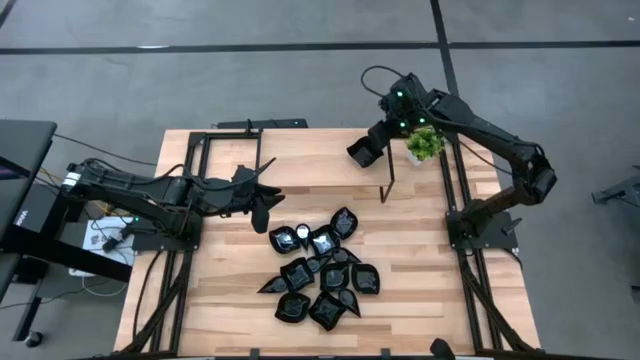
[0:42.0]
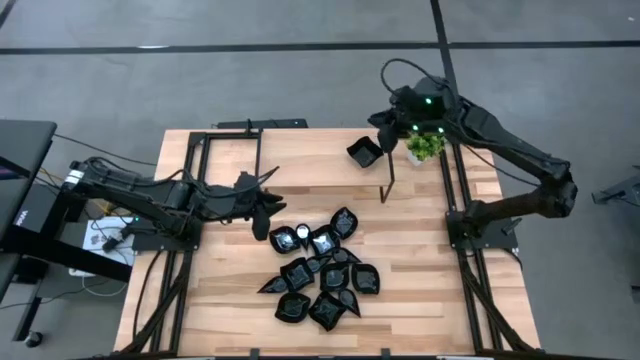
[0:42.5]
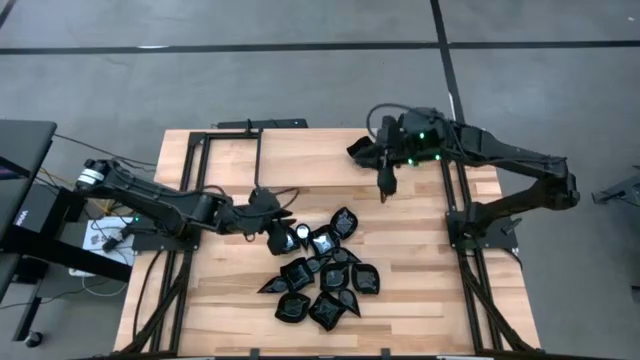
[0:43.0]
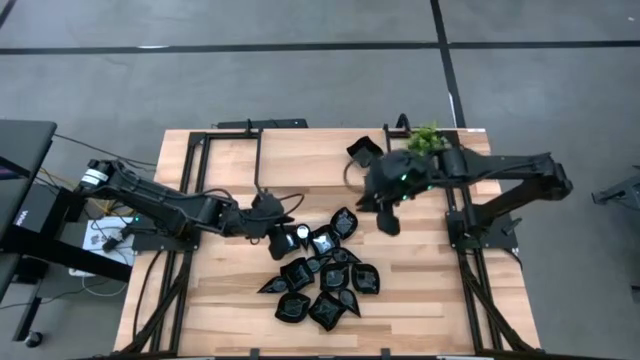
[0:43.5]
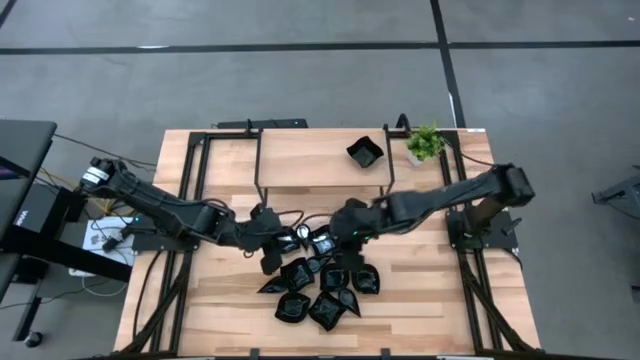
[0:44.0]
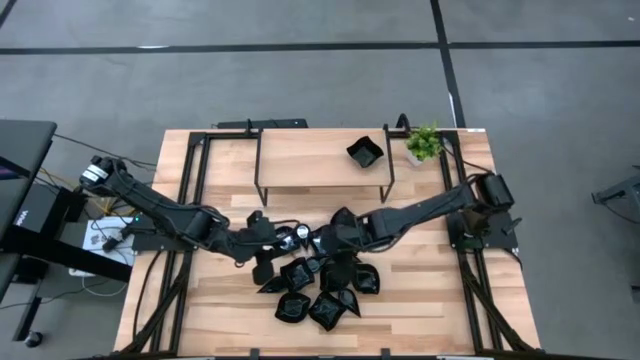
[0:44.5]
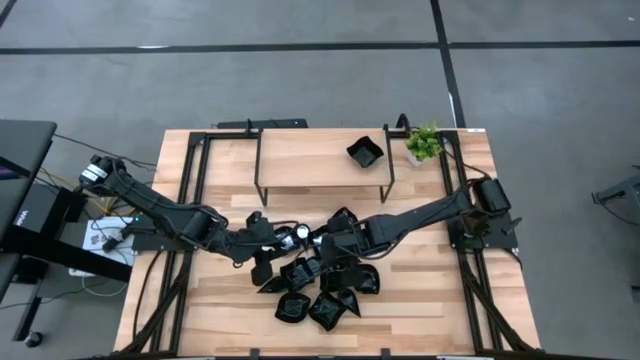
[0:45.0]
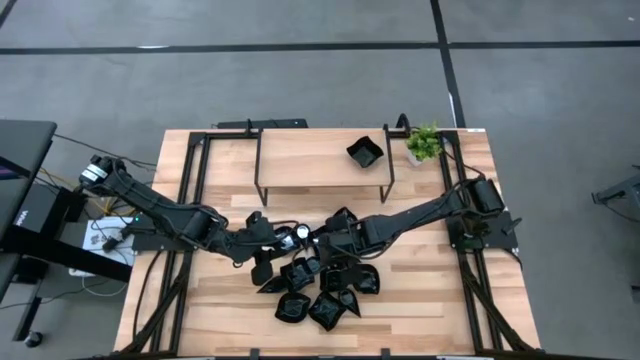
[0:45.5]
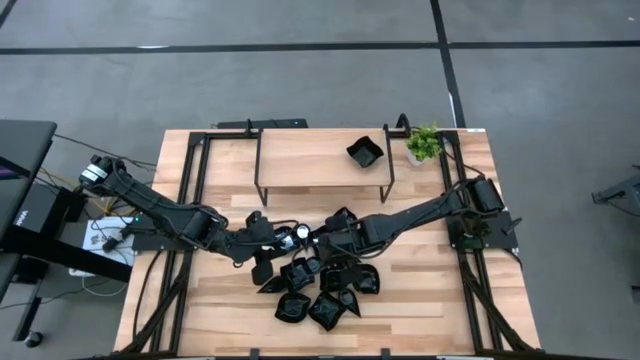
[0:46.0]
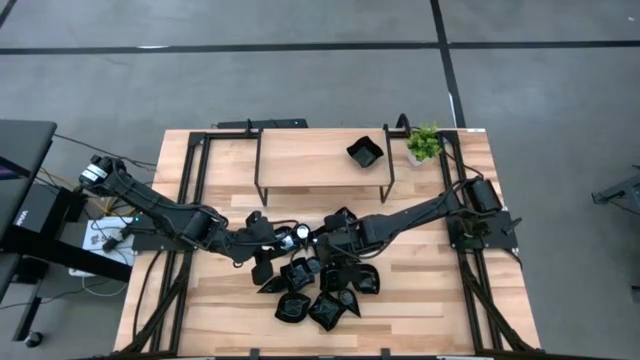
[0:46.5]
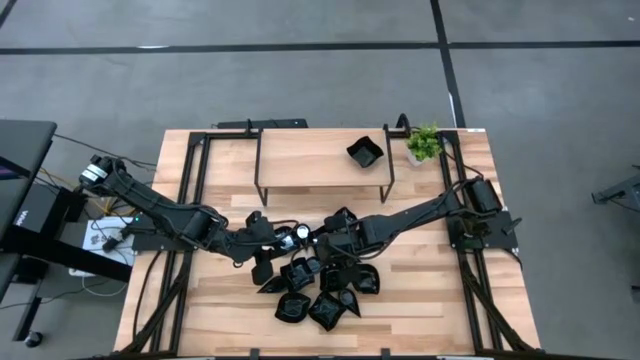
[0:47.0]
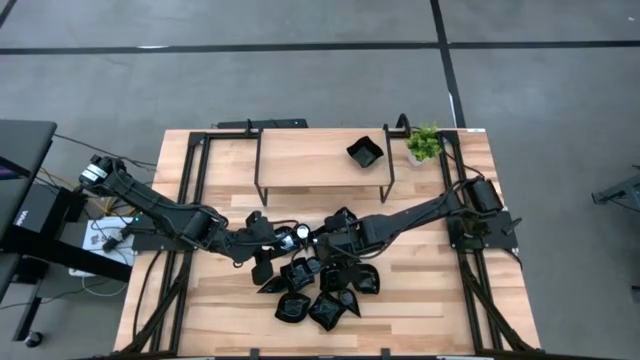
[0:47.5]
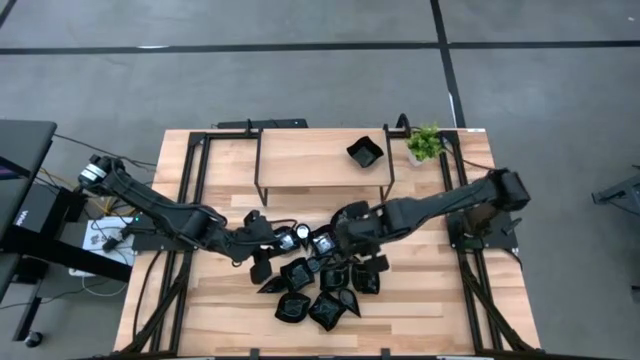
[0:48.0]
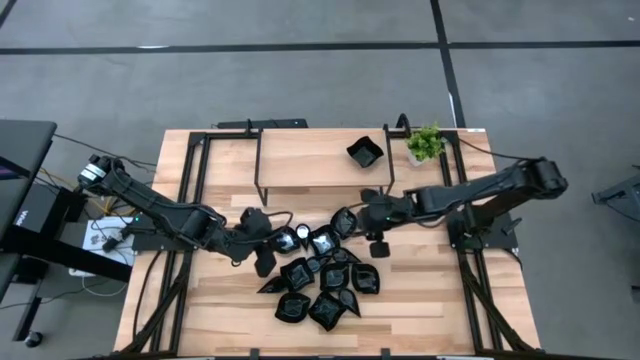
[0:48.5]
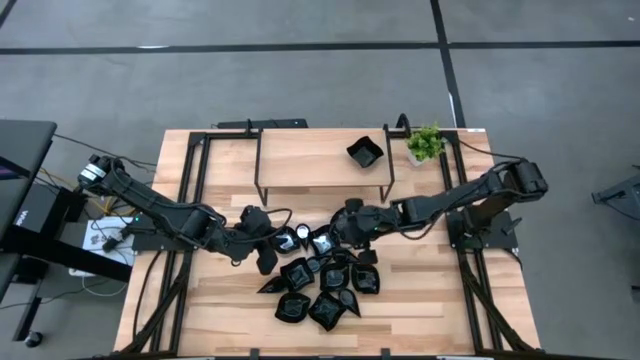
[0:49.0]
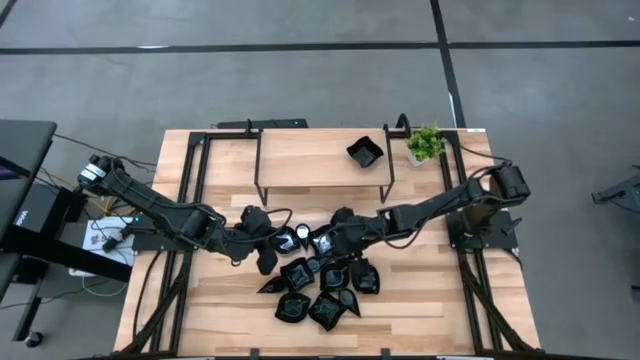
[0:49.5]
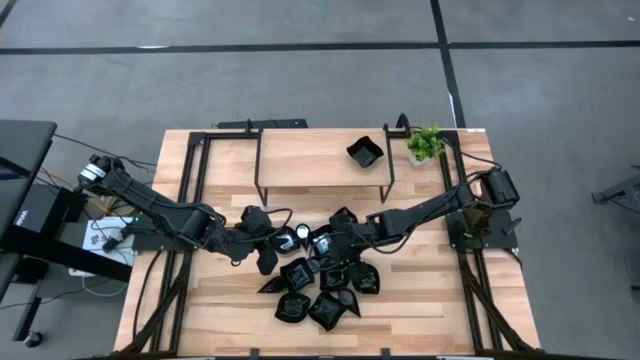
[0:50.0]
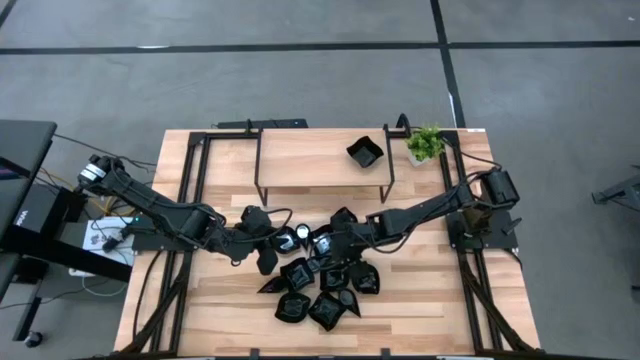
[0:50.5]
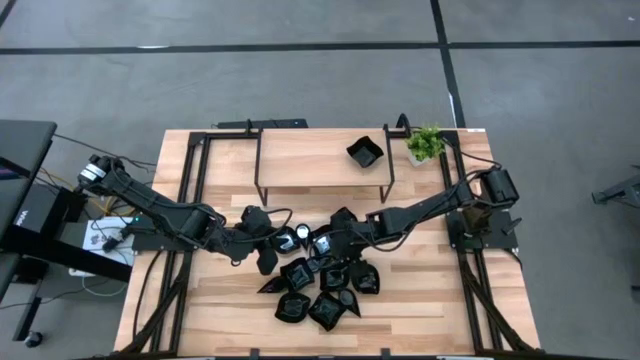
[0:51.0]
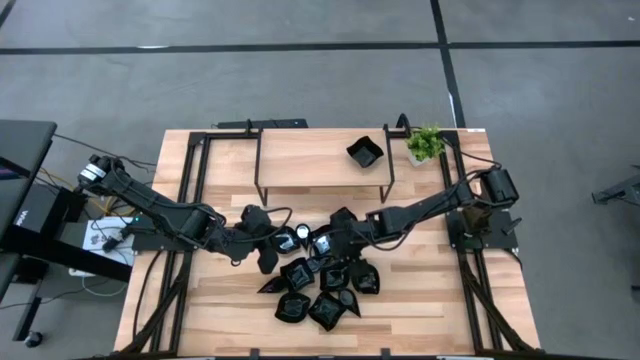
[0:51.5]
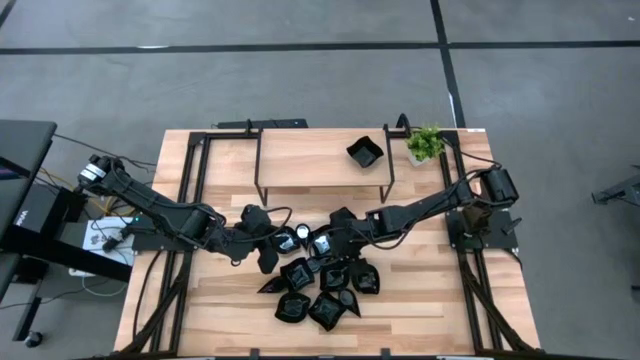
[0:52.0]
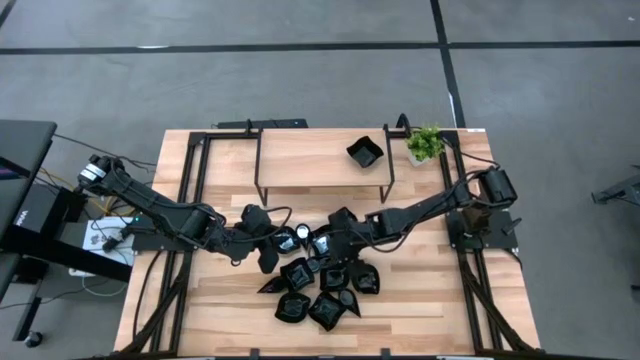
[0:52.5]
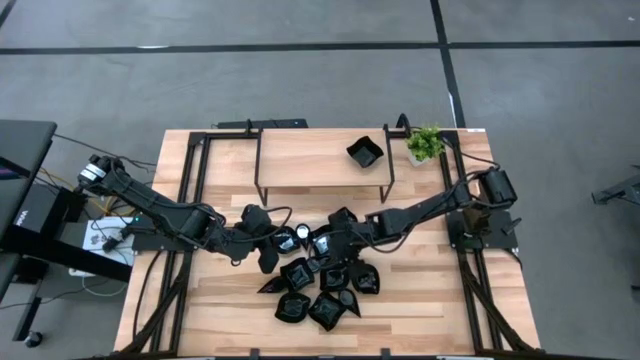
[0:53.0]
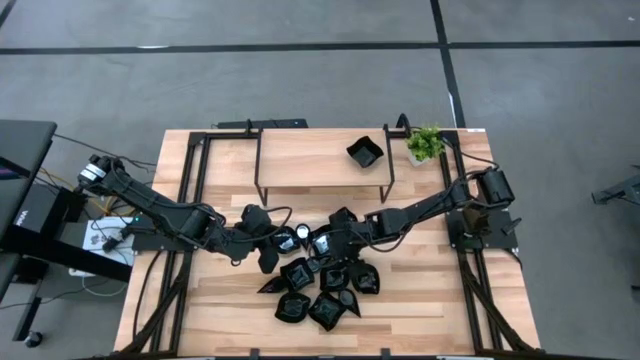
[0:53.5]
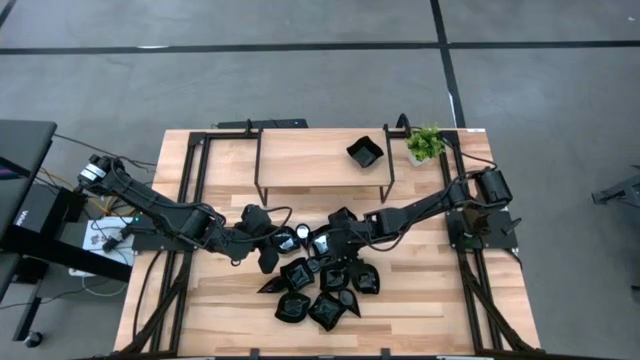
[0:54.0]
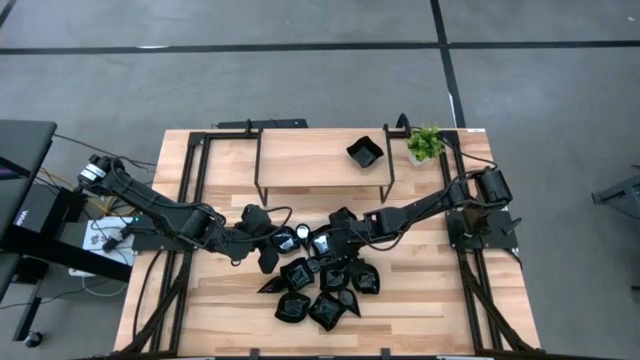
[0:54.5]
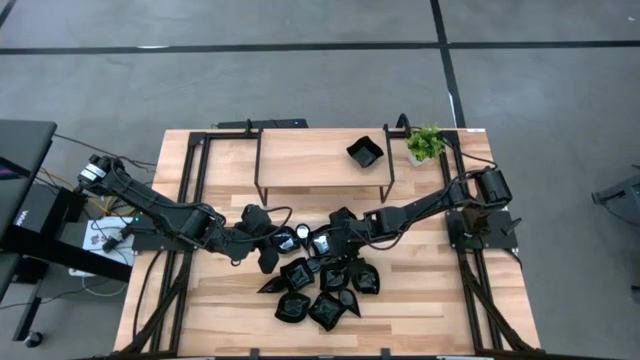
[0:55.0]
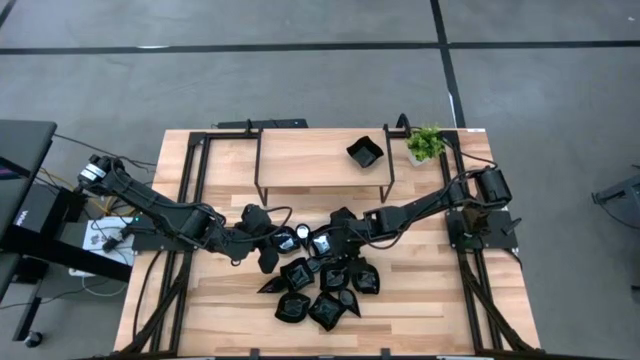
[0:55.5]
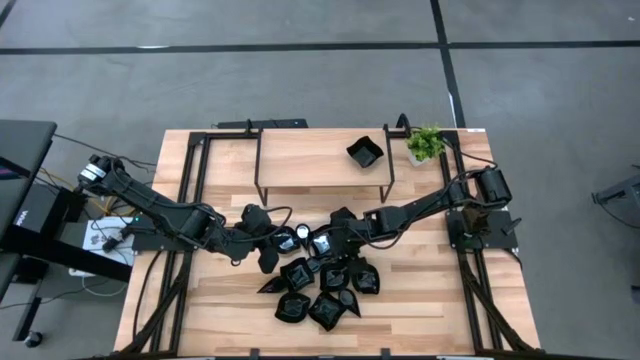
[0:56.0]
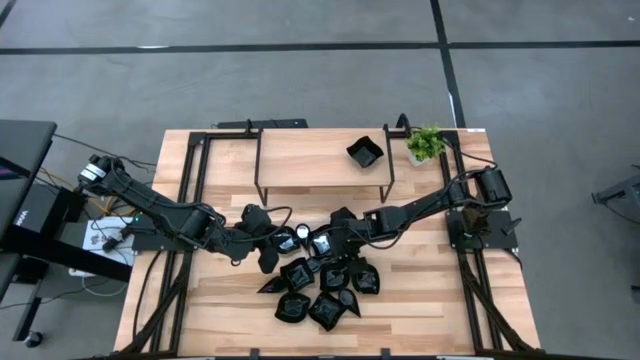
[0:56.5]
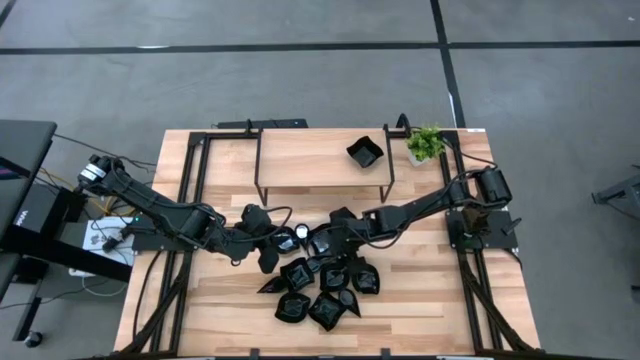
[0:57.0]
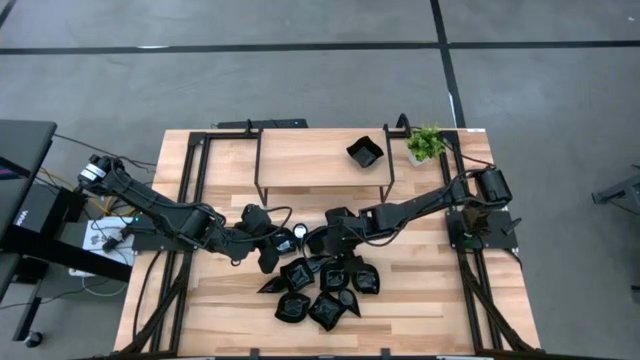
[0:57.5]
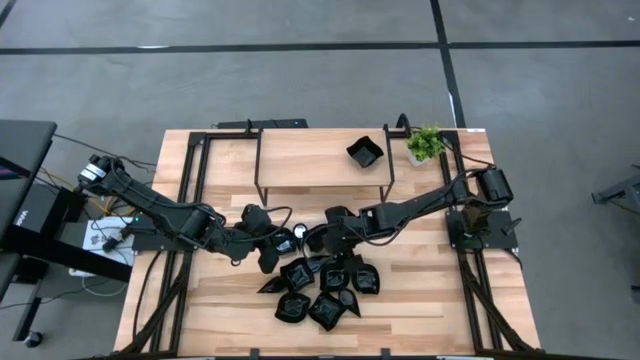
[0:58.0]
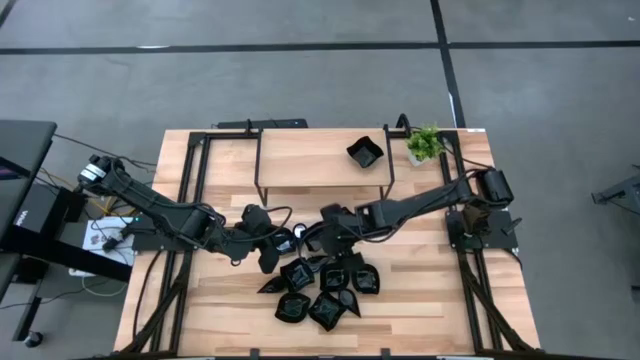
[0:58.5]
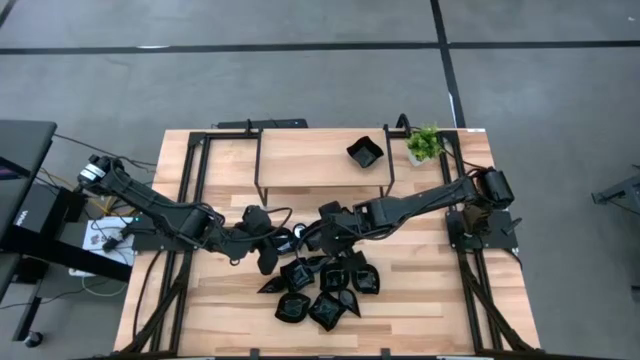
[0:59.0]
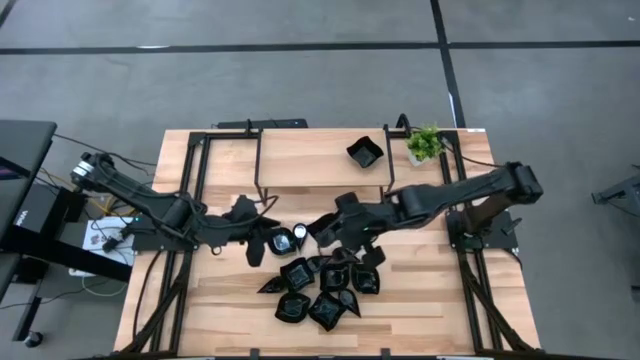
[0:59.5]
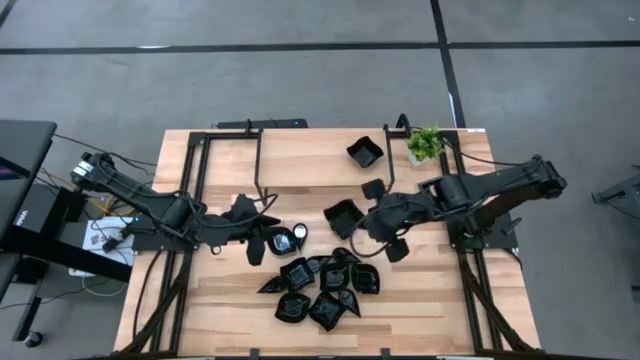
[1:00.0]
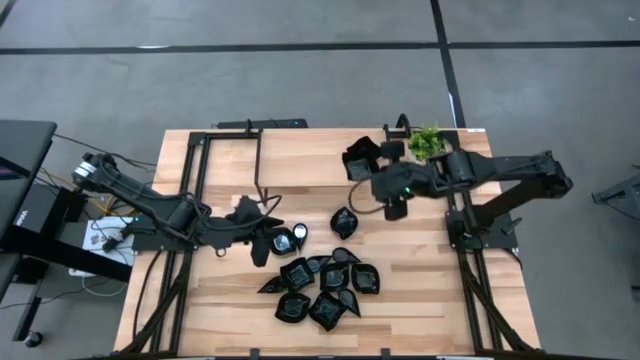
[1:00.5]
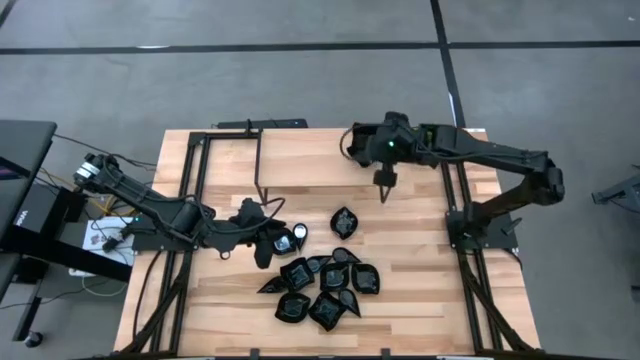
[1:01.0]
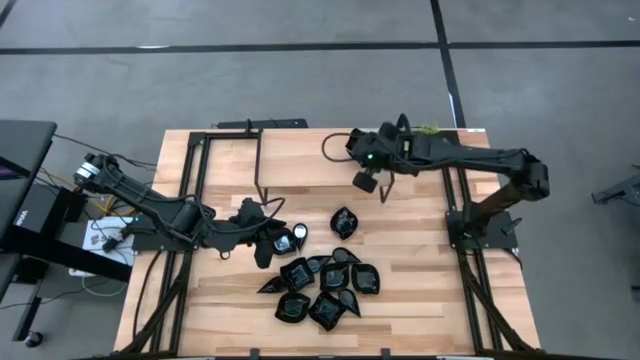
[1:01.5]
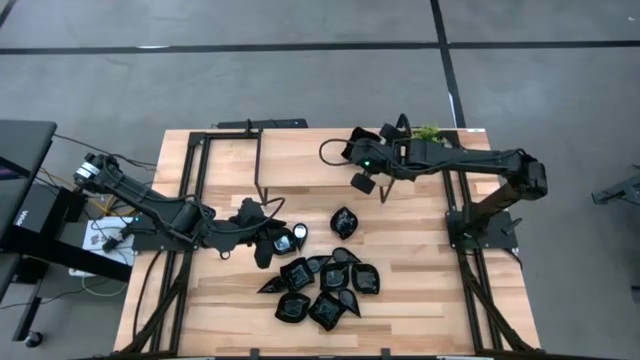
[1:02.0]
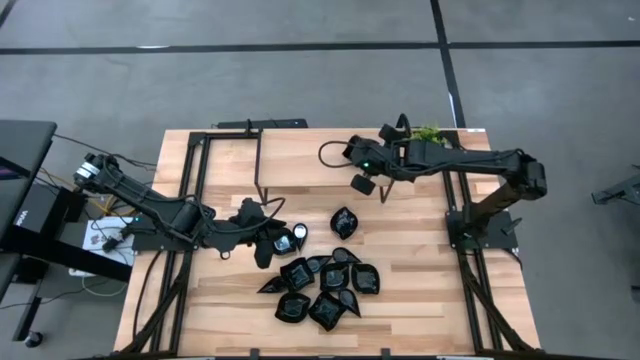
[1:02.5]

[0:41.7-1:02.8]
Task: Pick & Place Mini shaped plates
Stack the black distorted square plate on the black distorted square plate on the shelf
